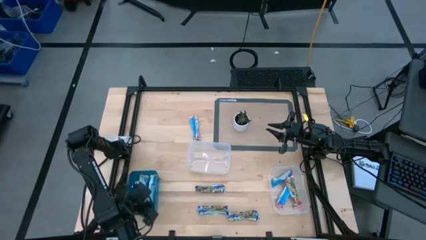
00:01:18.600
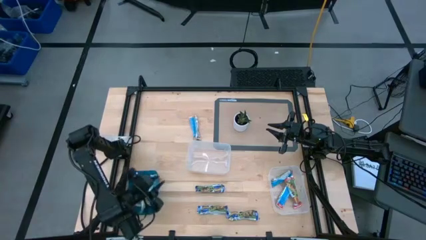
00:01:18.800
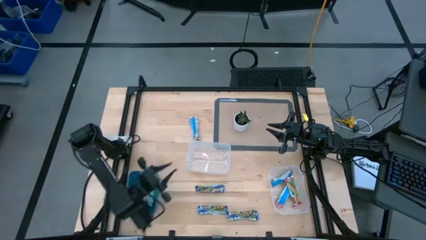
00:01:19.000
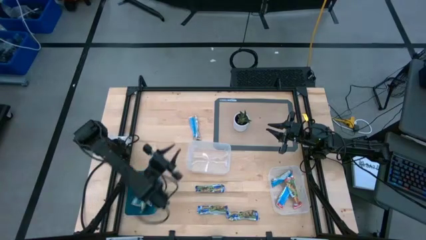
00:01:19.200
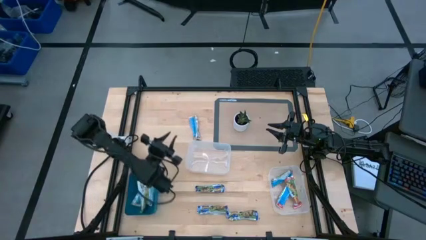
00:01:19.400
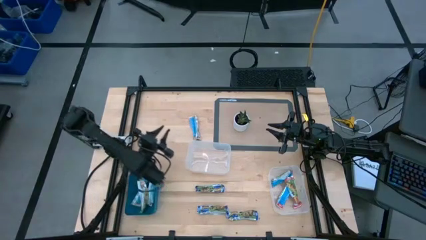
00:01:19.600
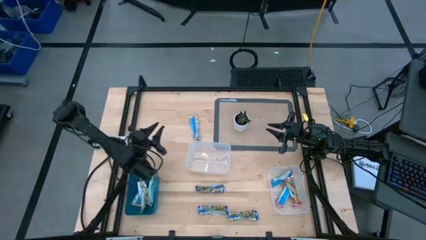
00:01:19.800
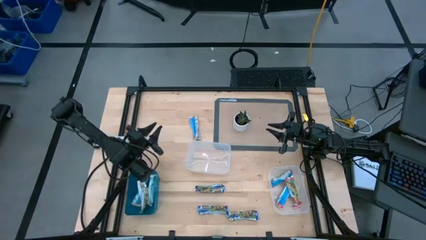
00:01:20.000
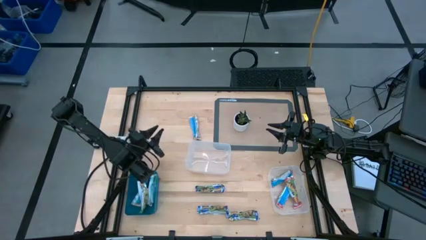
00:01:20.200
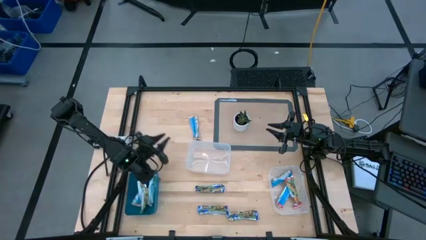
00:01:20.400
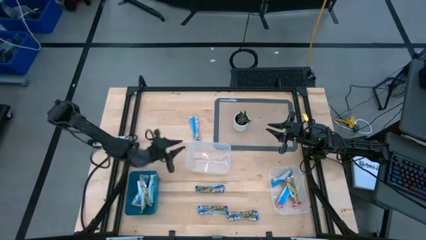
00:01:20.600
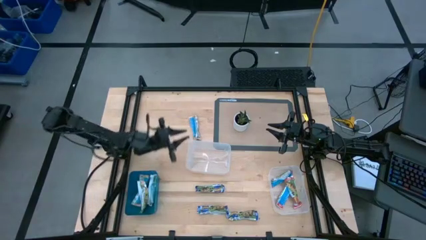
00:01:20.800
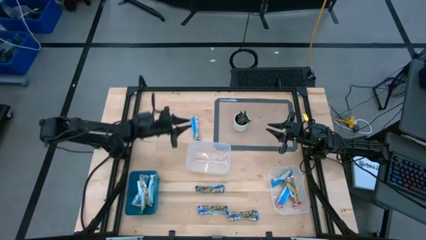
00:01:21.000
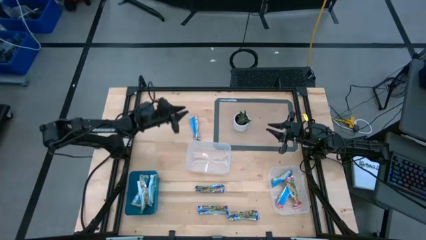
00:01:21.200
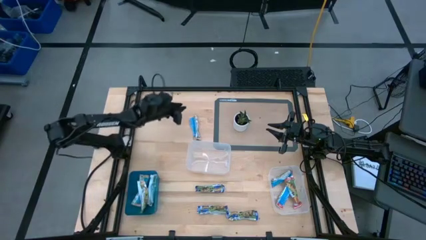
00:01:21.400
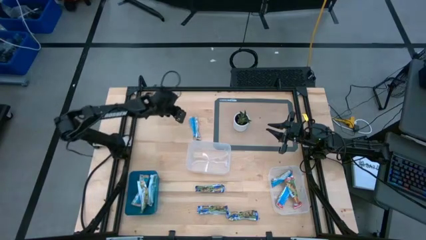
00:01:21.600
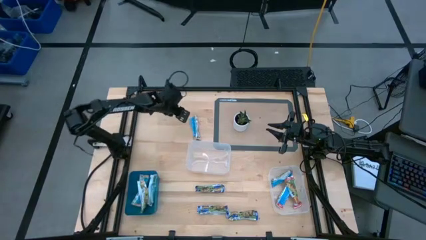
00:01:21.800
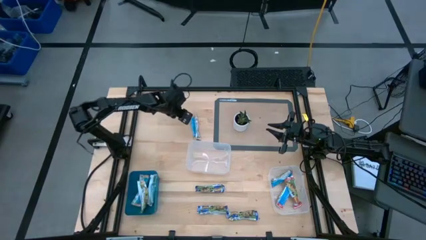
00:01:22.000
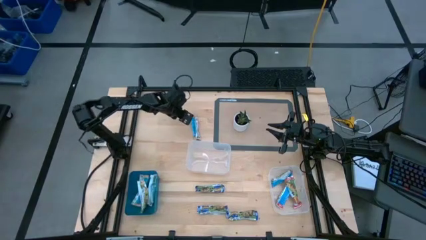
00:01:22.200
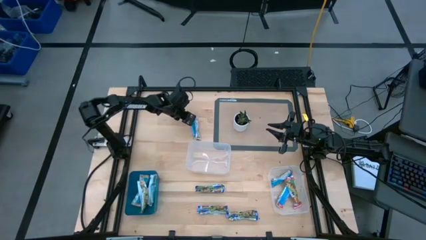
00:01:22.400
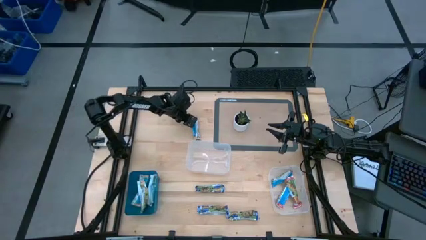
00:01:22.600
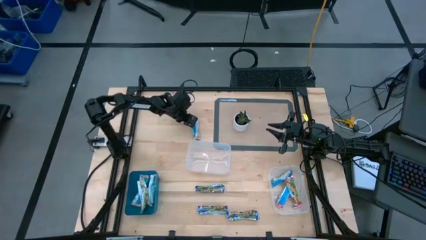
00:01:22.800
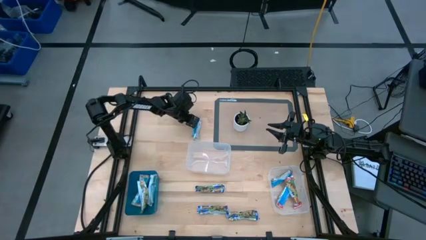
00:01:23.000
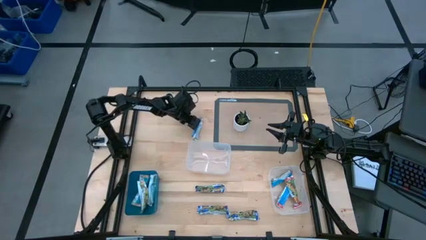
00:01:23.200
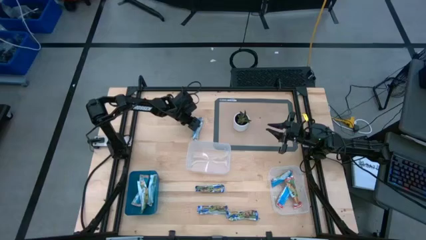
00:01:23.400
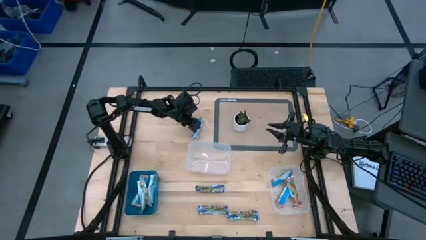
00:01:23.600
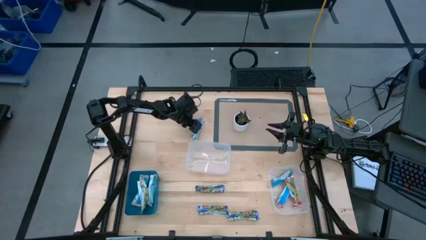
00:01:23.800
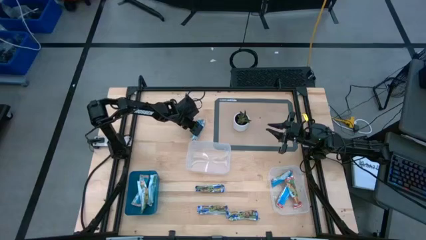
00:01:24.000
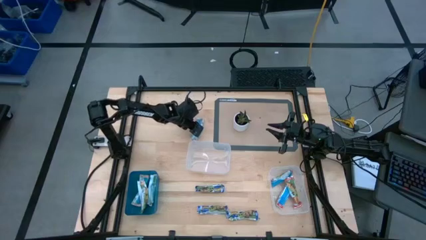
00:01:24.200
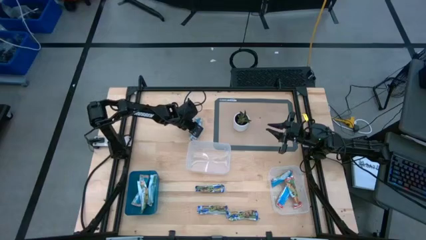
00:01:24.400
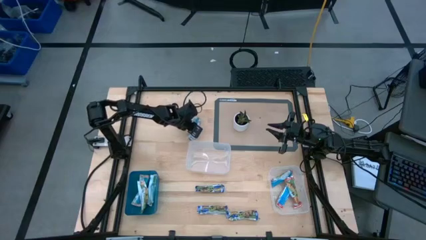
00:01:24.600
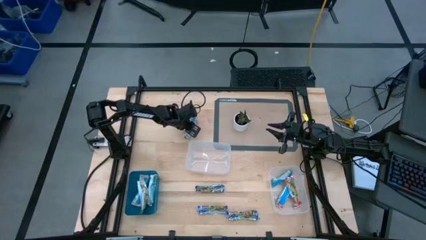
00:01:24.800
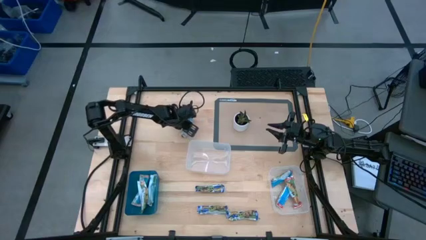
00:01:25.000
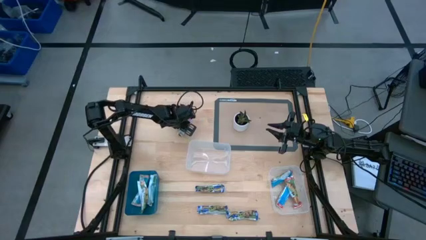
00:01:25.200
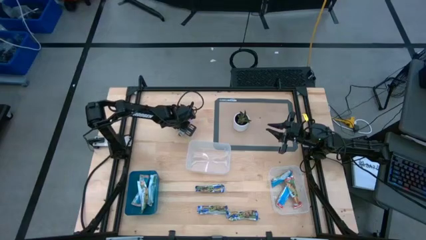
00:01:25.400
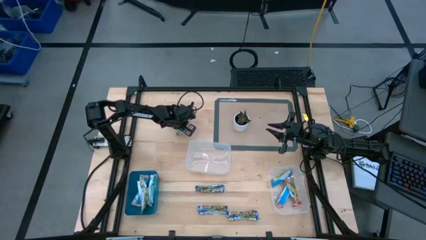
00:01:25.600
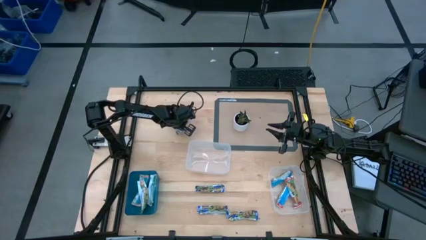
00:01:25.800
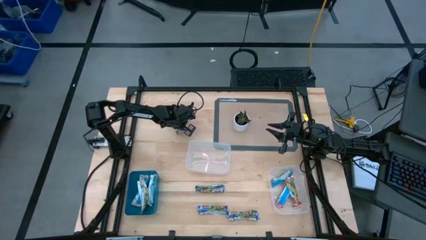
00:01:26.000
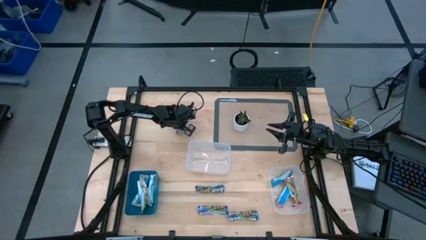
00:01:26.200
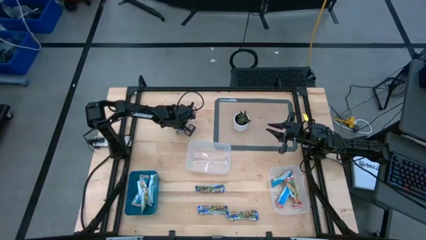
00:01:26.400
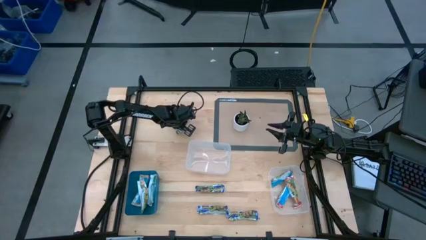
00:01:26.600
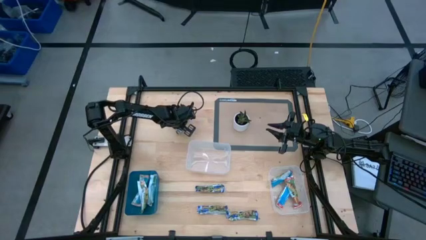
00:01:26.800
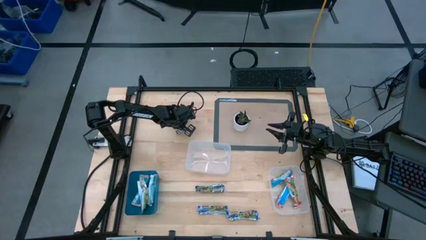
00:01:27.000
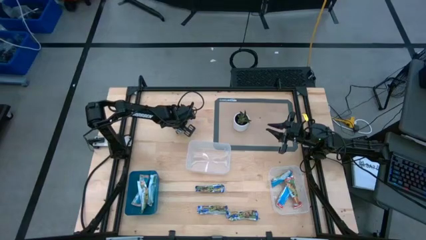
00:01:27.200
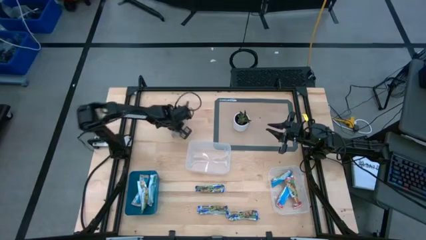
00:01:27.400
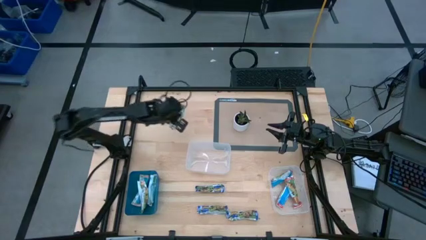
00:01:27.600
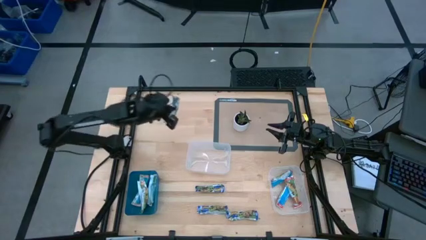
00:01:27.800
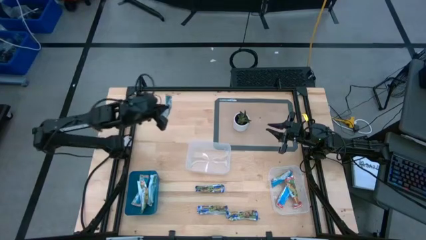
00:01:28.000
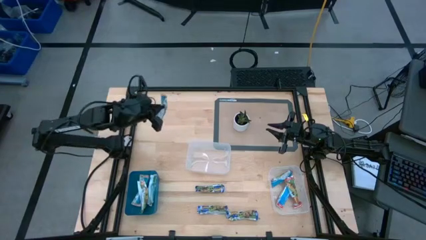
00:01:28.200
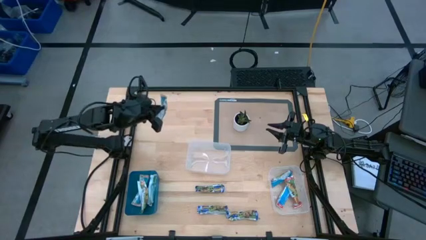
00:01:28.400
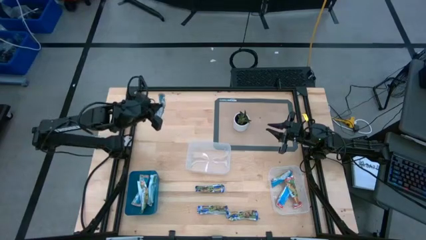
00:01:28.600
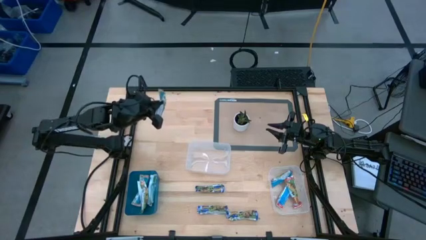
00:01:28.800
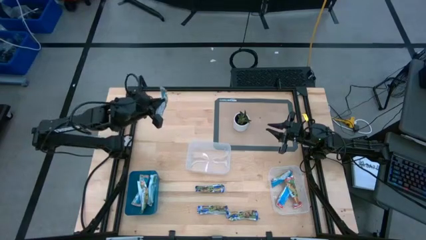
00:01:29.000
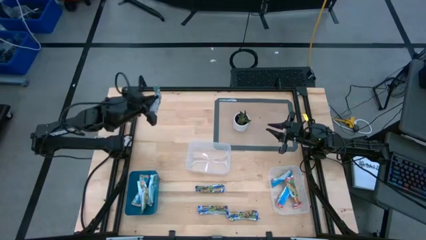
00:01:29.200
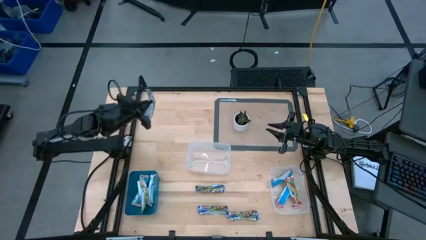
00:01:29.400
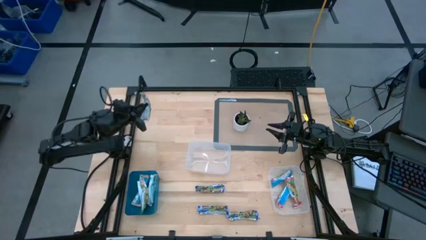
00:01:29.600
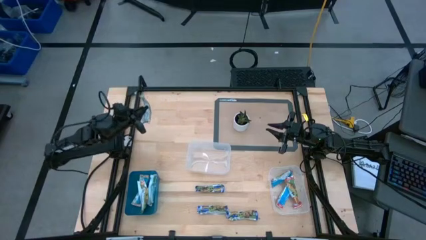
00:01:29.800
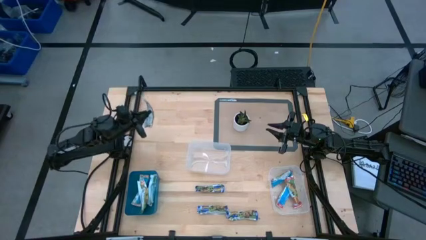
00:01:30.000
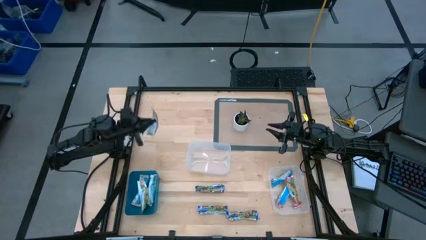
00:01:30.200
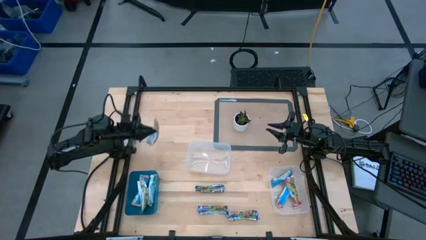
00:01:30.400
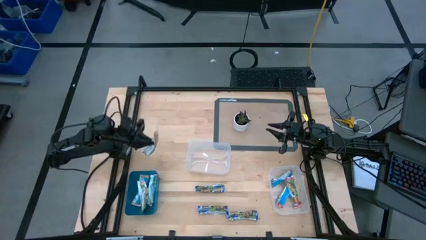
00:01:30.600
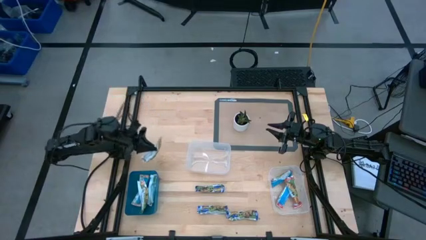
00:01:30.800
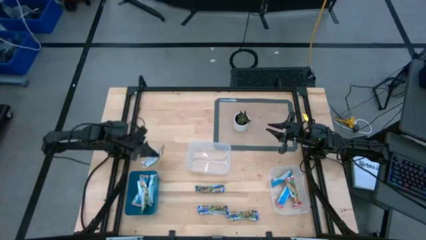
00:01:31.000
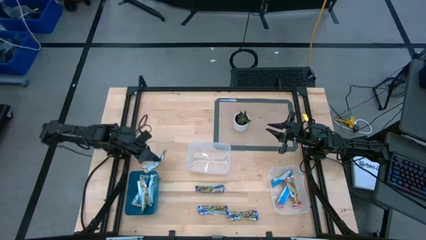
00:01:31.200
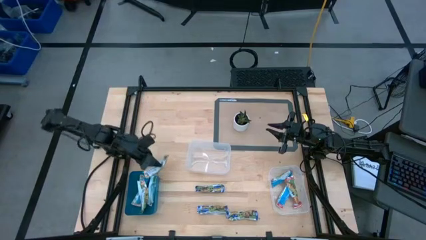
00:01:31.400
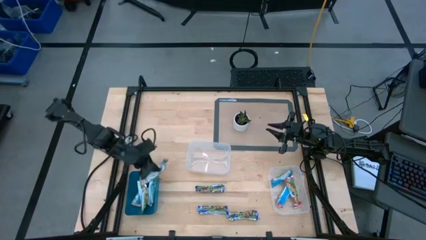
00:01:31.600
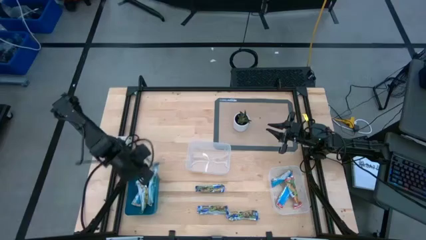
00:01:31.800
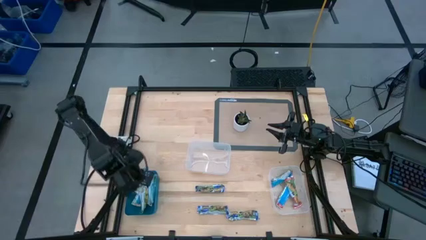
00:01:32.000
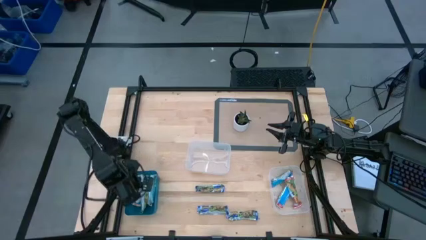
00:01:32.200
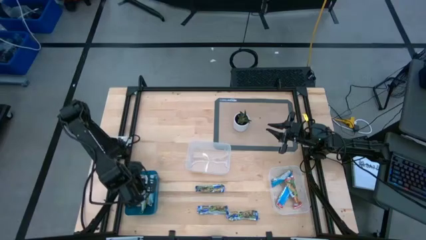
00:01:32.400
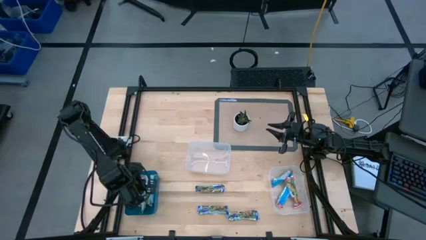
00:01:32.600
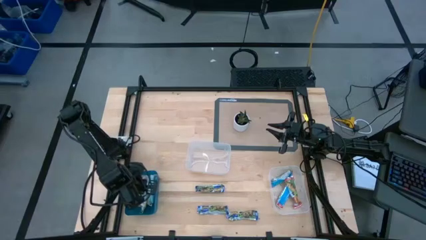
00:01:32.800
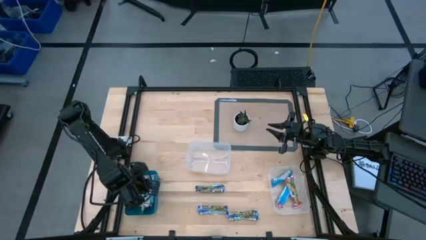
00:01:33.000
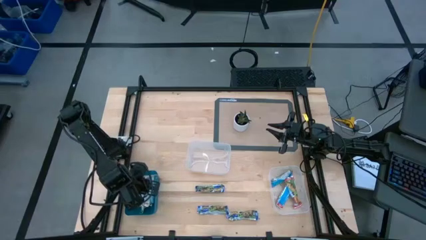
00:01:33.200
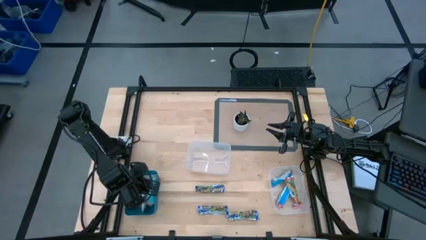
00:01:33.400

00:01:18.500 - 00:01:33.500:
Task: Pick and place Granola Bars by type
Put the orange granola bar into the blue bin
